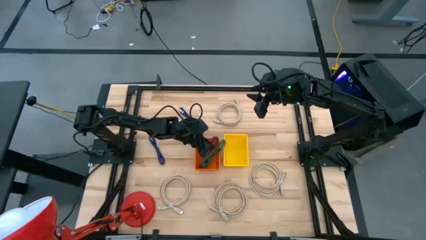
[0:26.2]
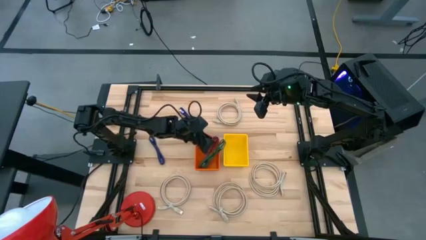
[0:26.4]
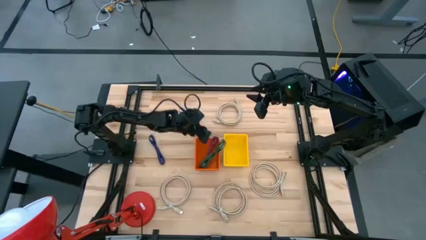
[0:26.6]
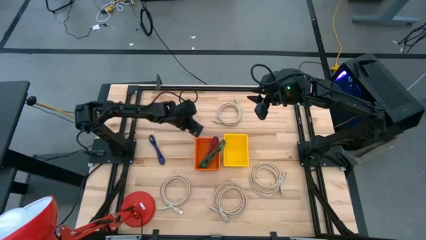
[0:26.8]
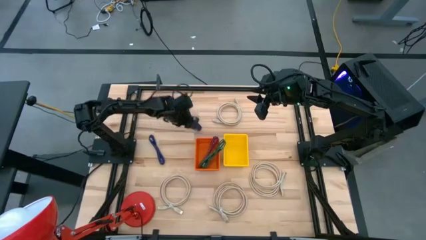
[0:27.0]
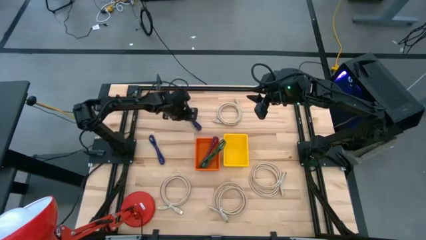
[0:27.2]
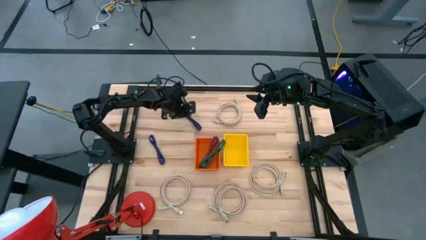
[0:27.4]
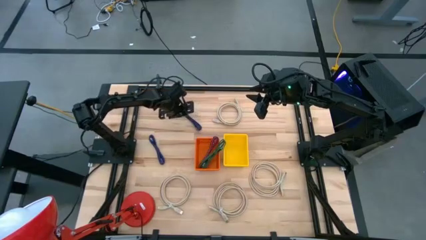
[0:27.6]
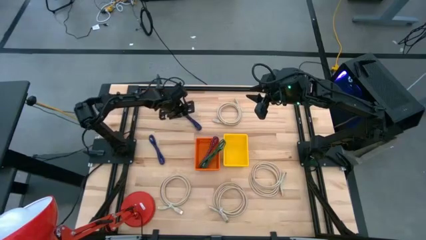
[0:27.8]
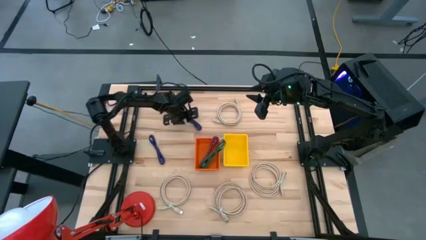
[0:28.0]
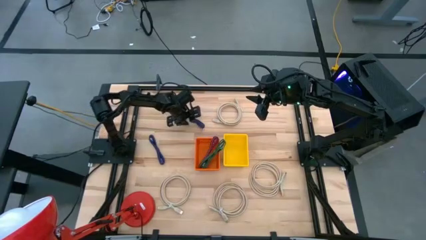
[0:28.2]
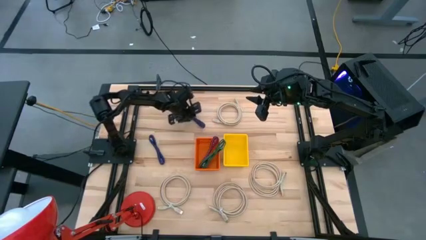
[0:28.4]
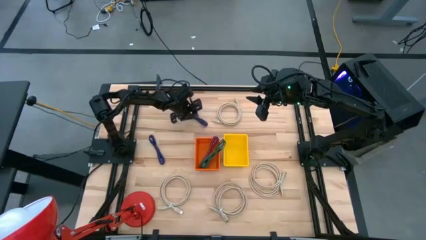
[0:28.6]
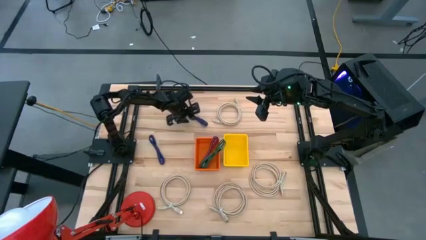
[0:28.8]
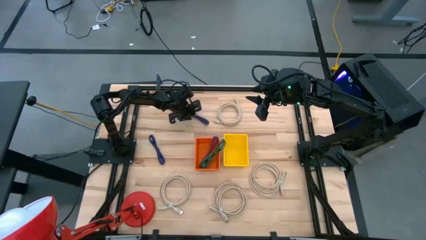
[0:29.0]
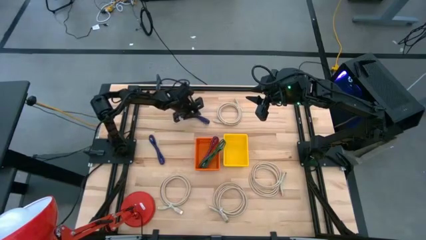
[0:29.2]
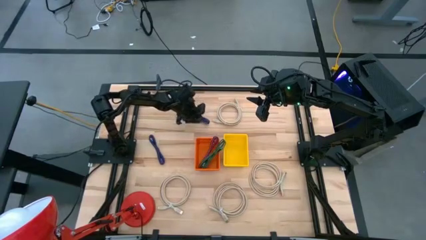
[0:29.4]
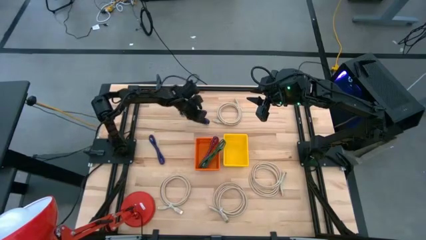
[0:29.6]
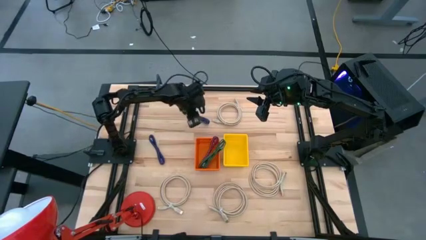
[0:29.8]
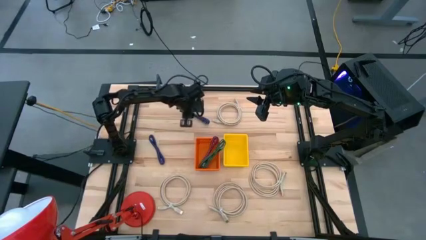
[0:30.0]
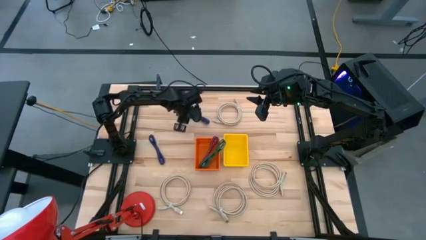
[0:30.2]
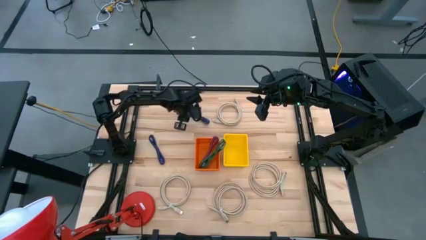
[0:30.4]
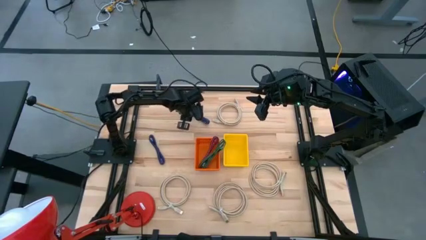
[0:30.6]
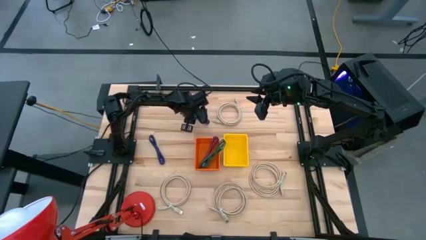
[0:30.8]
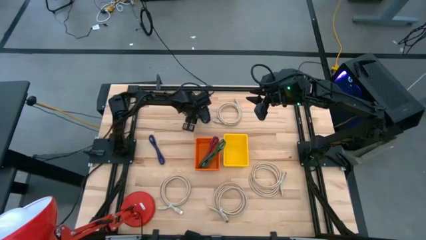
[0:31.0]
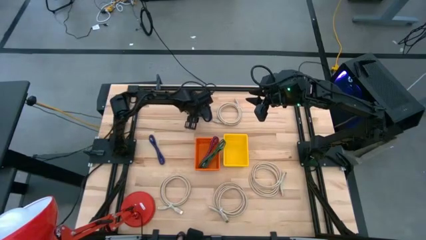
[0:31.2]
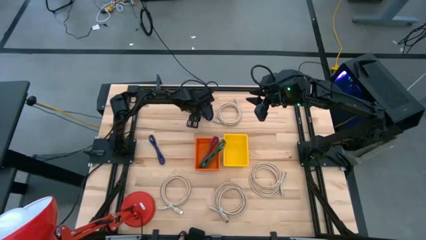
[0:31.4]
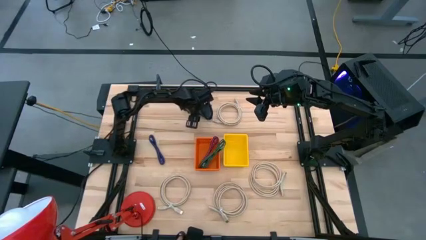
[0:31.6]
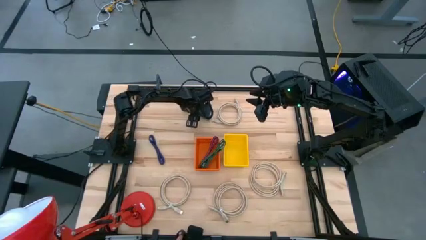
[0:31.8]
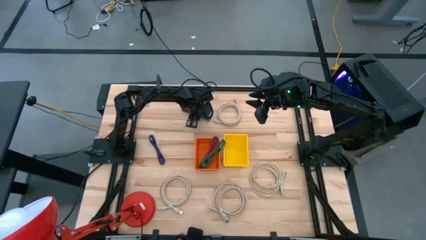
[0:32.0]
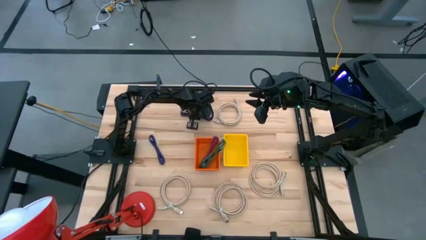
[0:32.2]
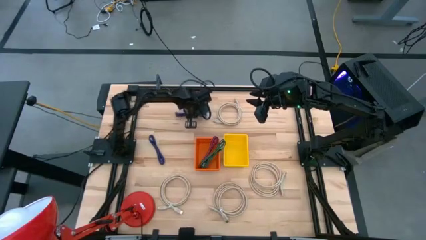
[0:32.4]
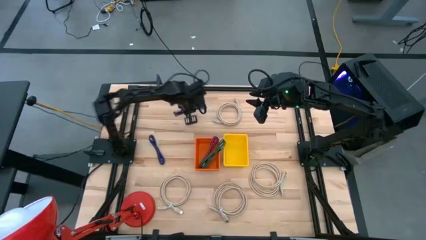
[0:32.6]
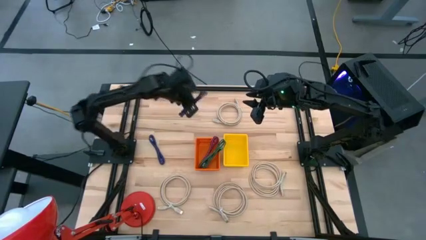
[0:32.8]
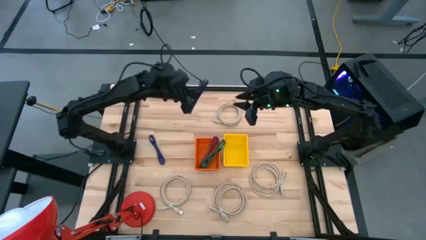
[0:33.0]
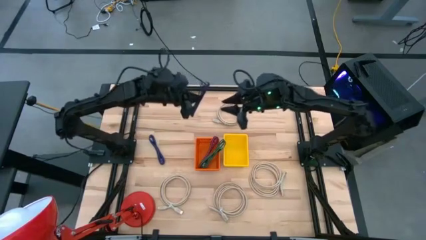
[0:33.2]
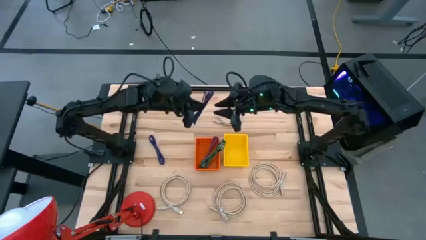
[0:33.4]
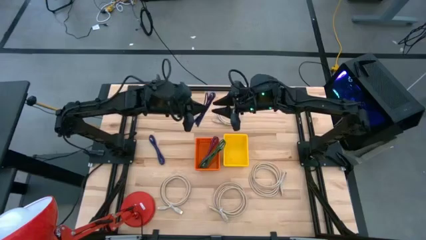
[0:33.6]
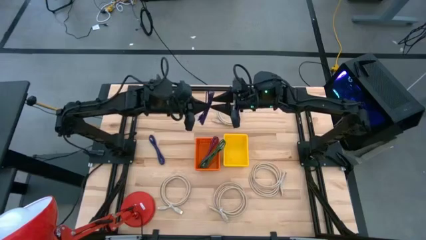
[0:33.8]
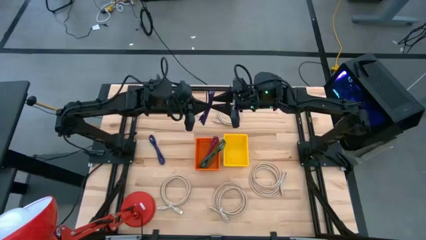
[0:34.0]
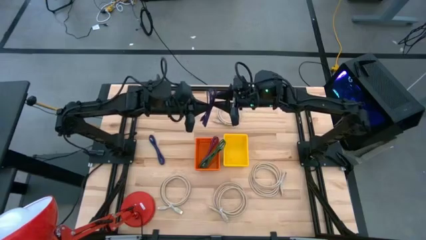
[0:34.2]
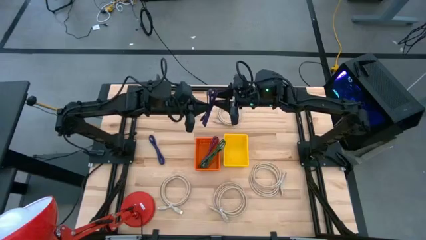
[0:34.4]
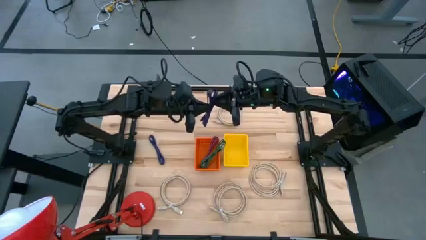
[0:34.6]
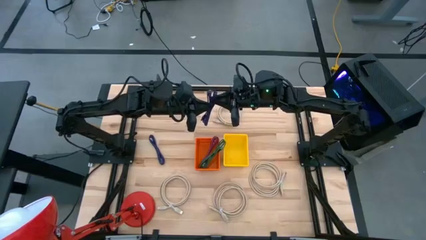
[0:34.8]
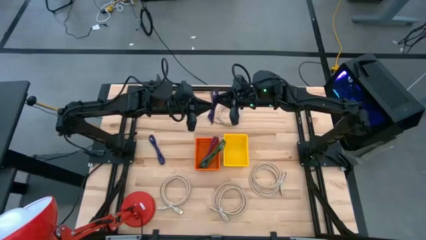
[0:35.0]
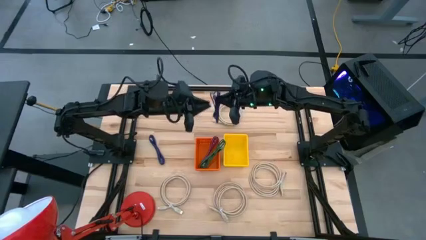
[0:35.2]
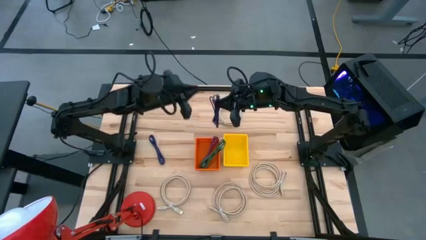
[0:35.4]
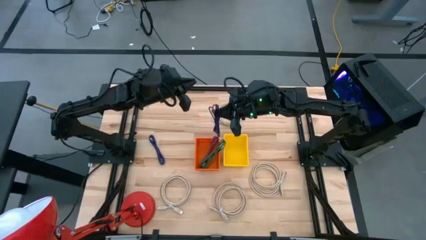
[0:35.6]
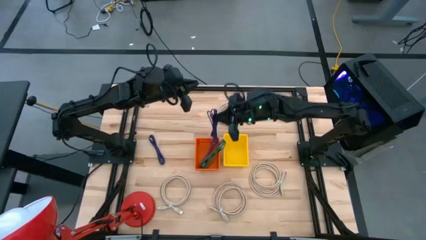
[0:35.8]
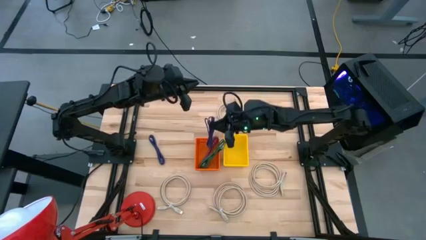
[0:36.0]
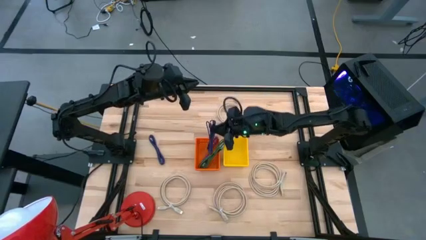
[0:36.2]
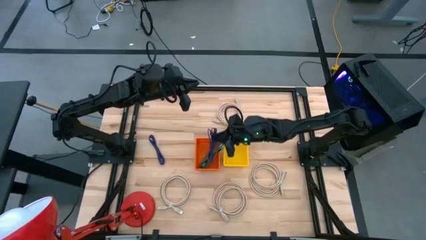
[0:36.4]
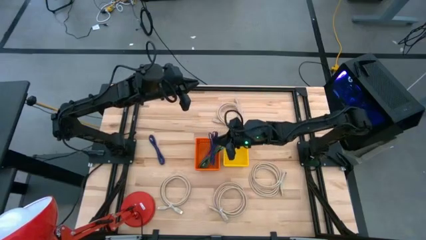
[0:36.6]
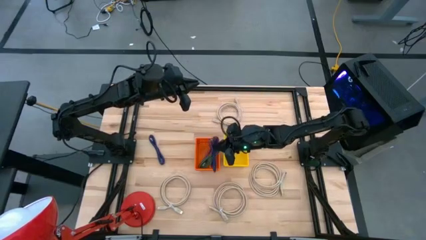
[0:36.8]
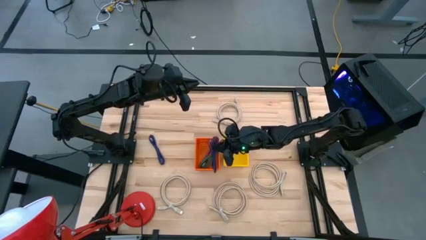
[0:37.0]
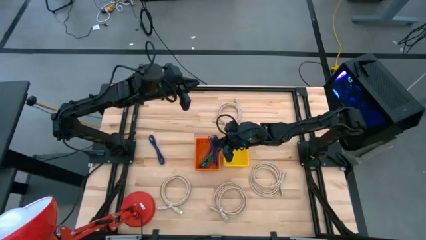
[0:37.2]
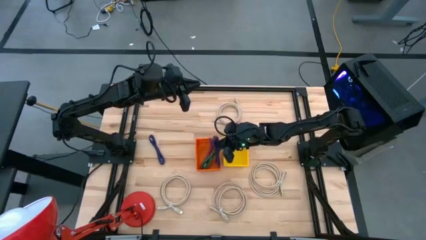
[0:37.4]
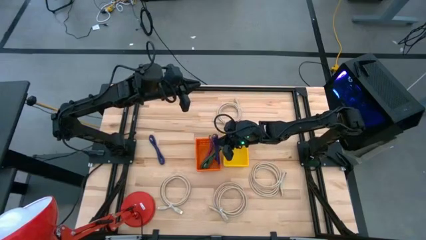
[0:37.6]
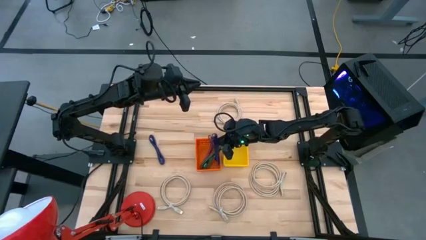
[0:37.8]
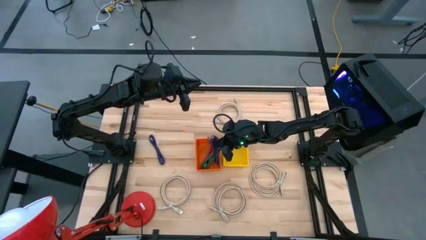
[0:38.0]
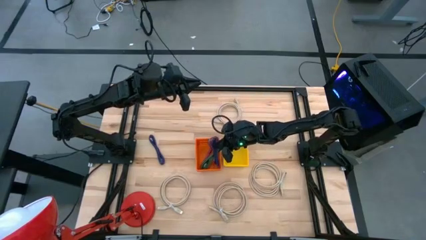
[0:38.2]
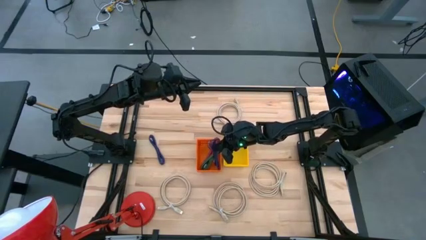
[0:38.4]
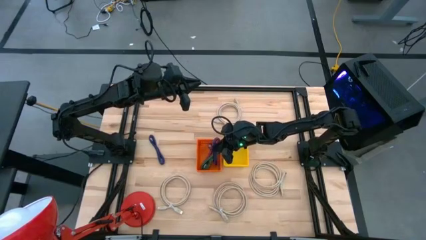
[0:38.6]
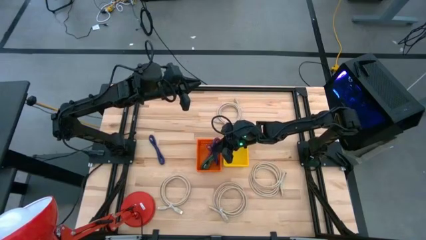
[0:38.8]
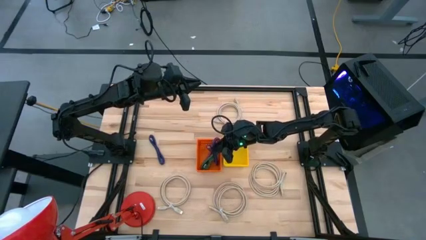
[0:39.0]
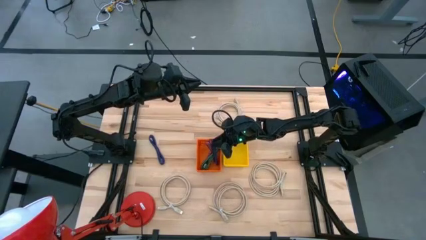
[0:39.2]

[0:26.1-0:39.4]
Task: Pick & Place USB Port
Put the purple charger cable into the orange basket

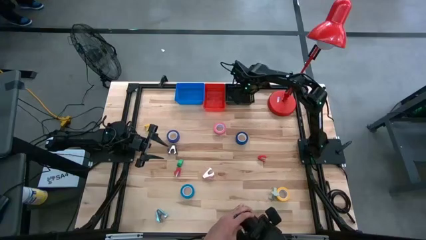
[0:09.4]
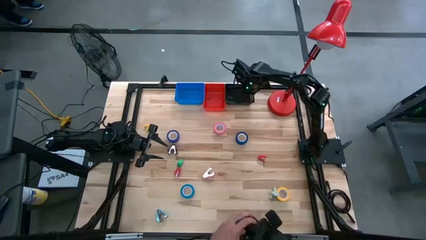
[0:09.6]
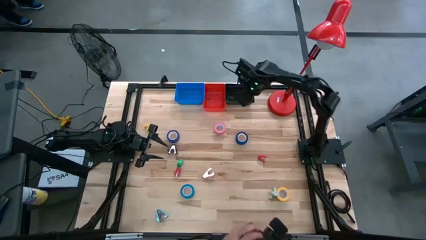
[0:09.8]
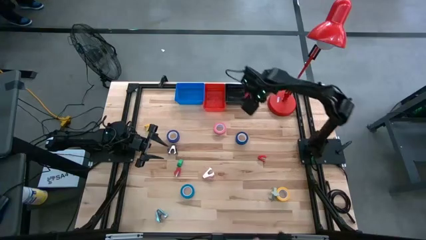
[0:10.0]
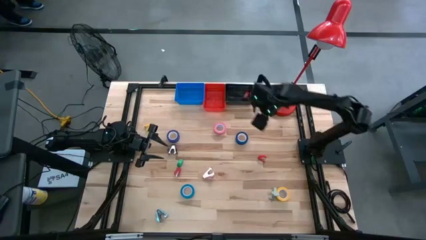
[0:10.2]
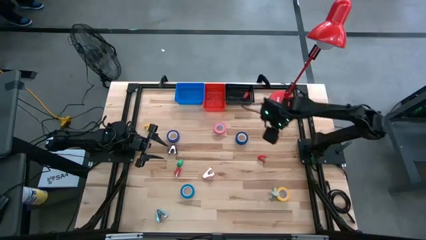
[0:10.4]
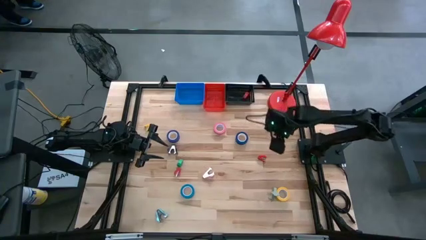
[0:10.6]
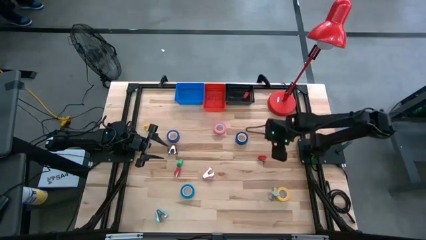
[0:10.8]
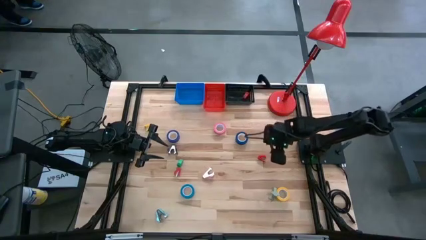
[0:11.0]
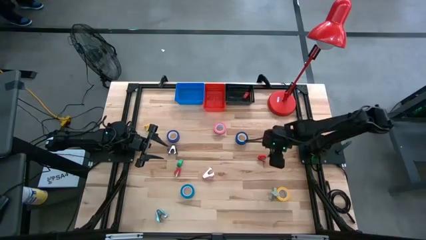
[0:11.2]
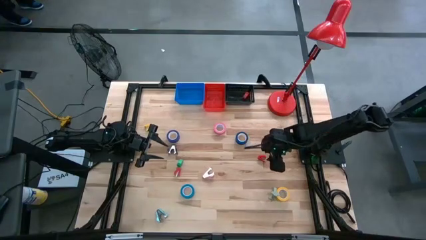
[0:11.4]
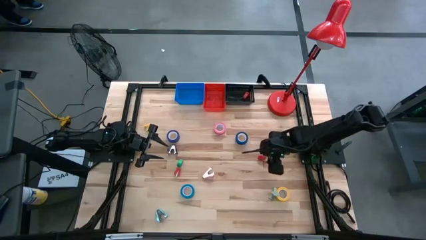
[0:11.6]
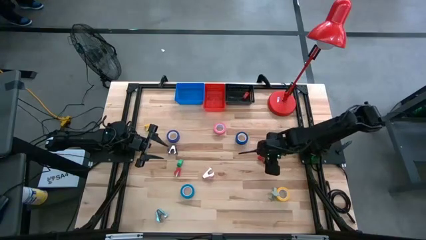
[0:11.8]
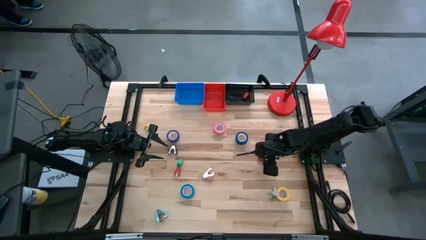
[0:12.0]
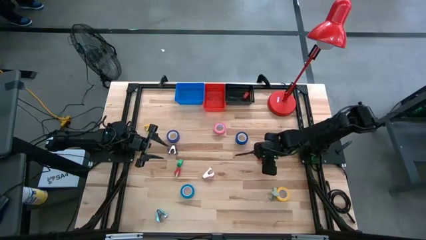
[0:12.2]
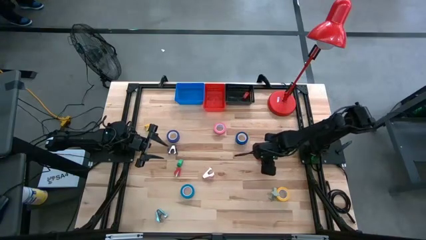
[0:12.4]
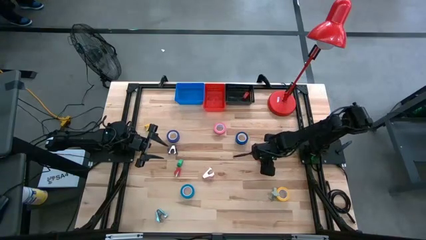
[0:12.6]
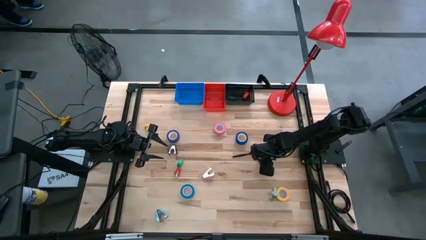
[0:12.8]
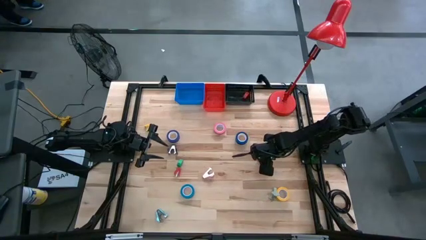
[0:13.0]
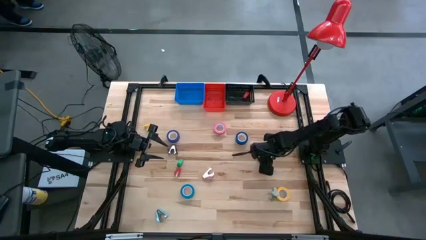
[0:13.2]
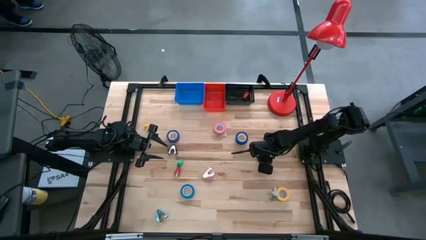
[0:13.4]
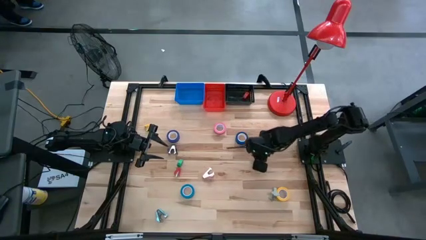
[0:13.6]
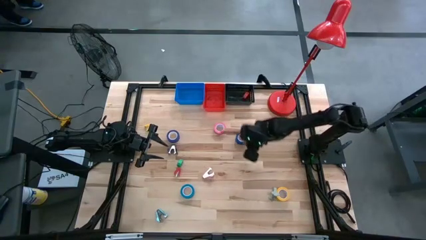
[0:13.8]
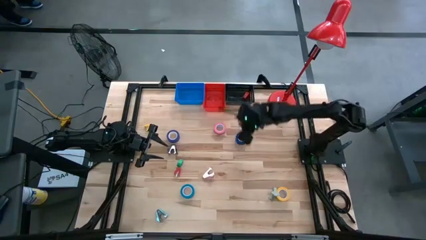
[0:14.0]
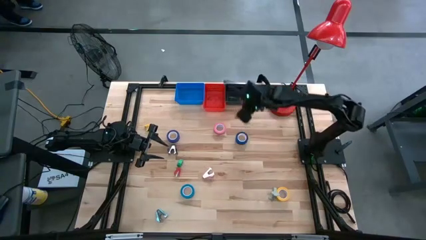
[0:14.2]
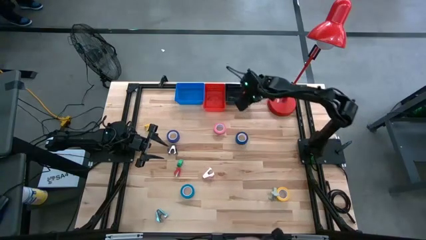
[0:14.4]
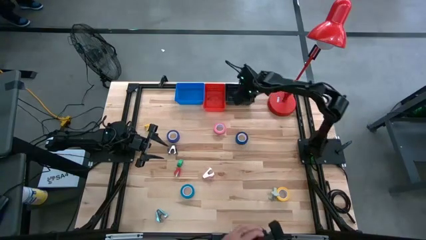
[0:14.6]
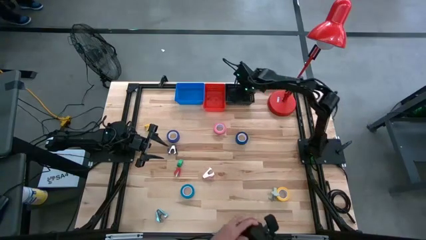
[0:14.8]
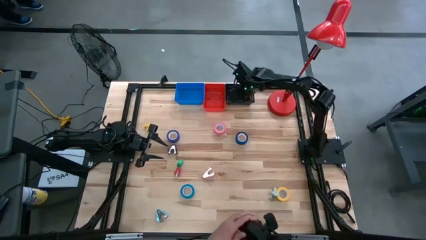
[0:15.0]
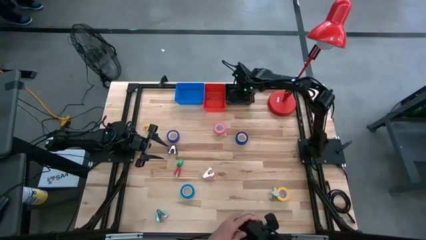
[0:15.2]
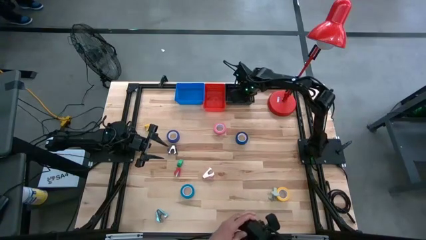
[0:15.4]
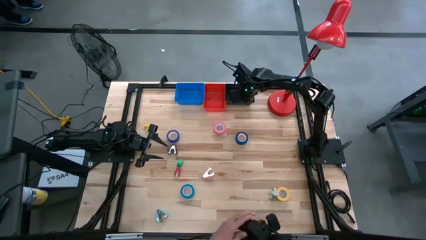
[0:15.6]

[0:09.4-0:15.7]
Task: Pick and place Stapler, Stapler remover, tape
Put the right red stapler into the black basket
